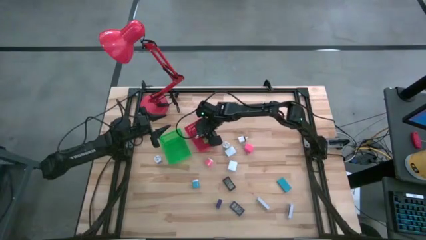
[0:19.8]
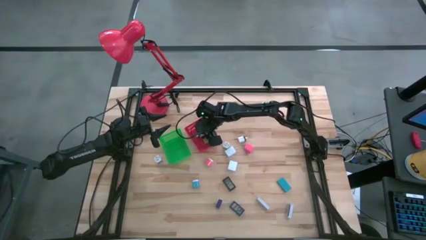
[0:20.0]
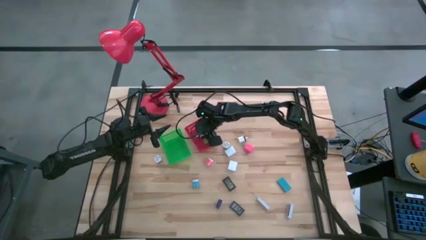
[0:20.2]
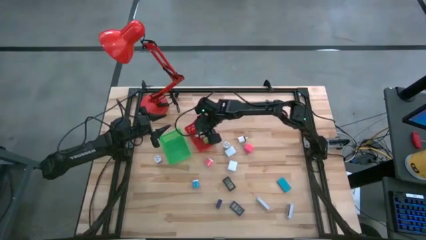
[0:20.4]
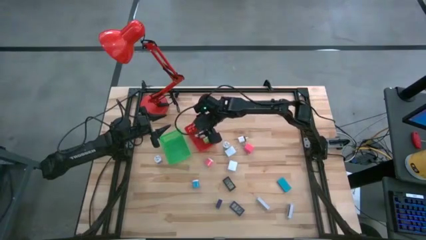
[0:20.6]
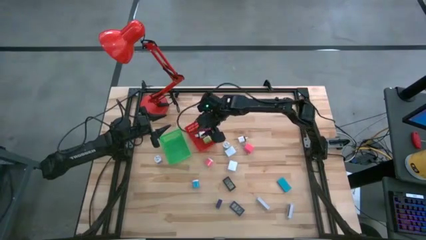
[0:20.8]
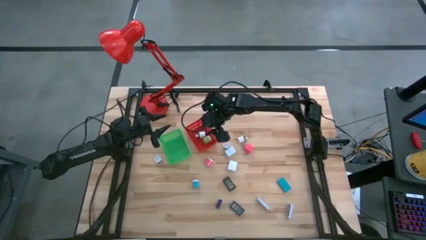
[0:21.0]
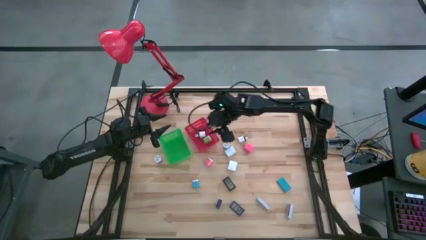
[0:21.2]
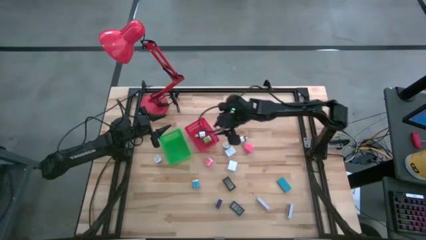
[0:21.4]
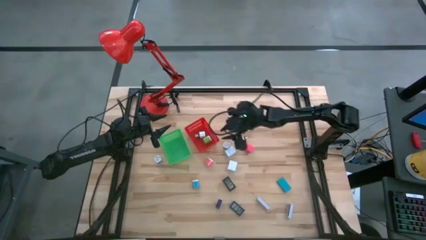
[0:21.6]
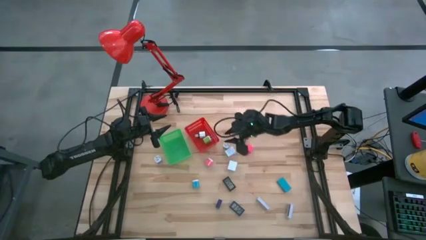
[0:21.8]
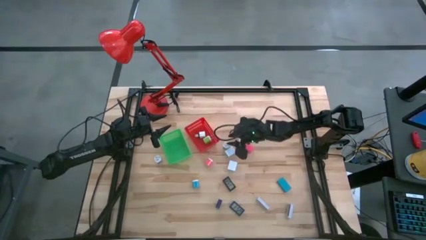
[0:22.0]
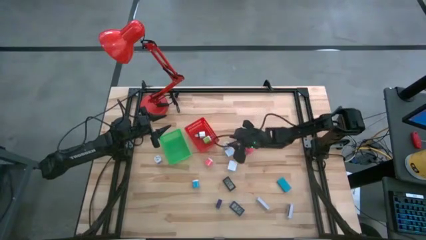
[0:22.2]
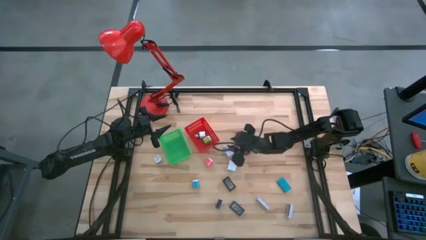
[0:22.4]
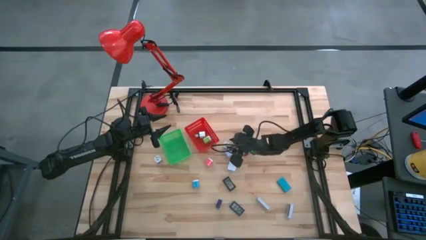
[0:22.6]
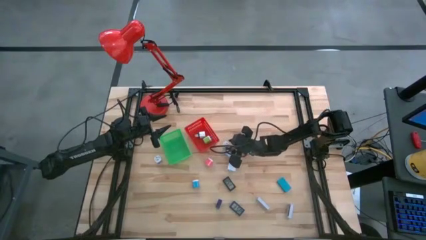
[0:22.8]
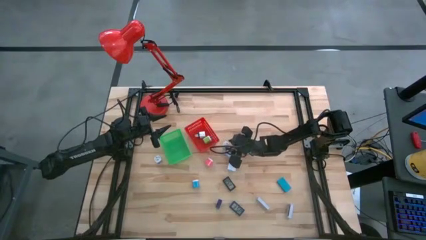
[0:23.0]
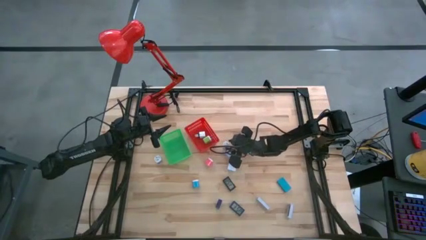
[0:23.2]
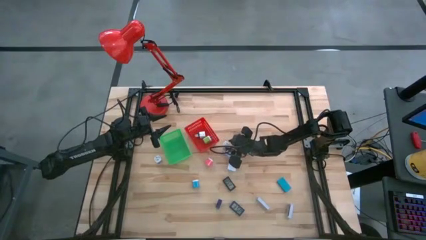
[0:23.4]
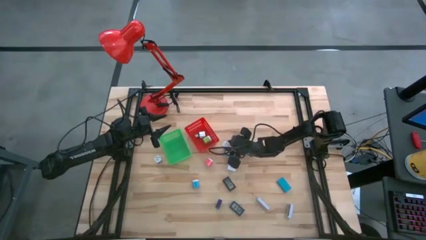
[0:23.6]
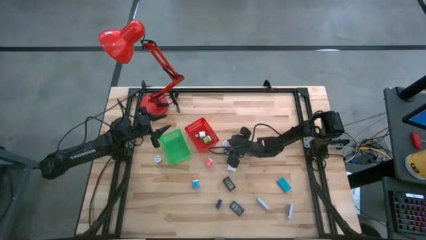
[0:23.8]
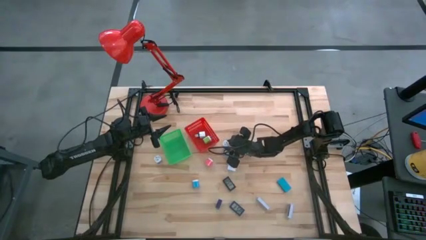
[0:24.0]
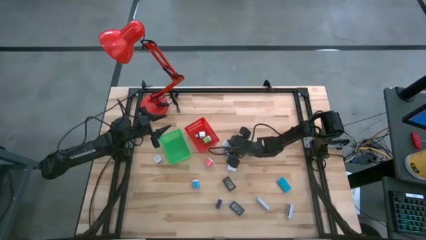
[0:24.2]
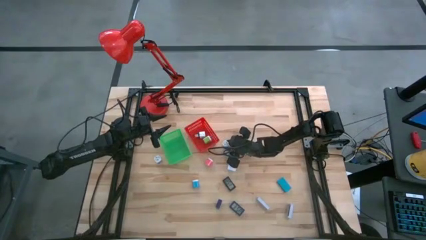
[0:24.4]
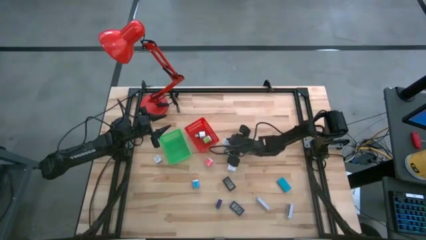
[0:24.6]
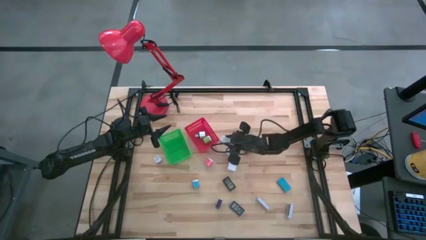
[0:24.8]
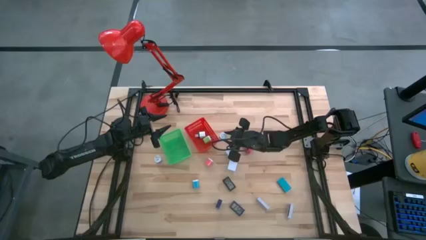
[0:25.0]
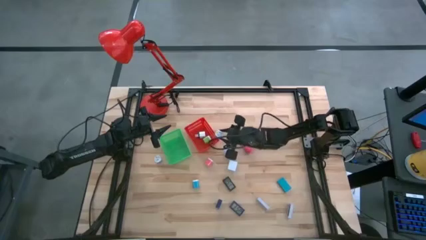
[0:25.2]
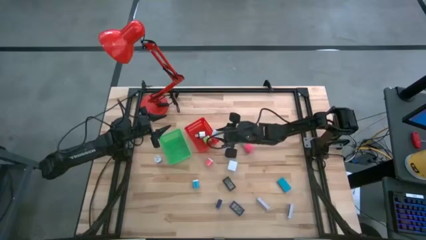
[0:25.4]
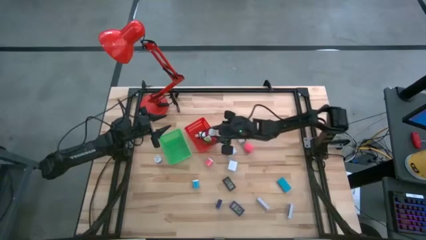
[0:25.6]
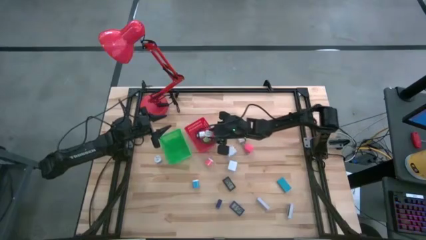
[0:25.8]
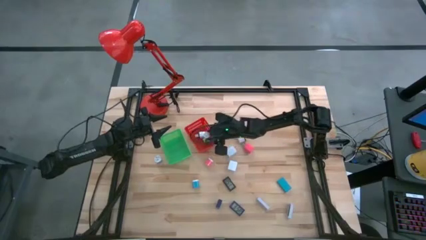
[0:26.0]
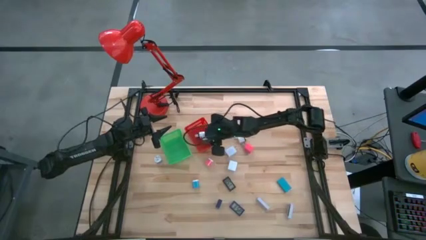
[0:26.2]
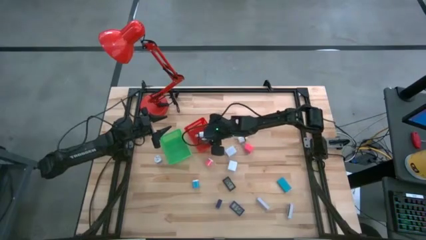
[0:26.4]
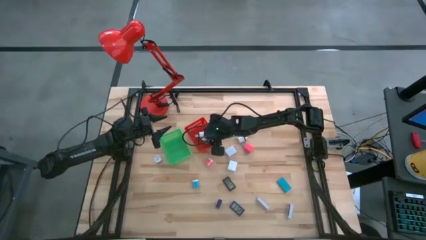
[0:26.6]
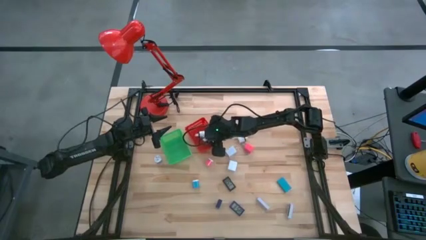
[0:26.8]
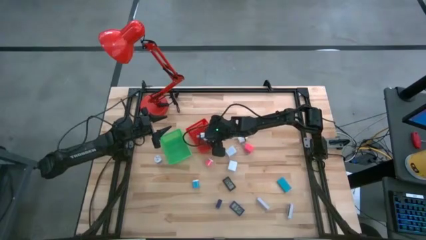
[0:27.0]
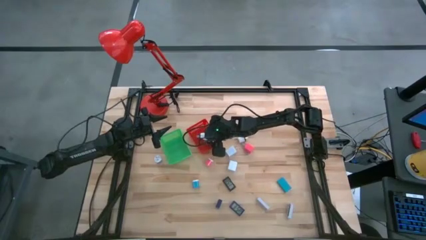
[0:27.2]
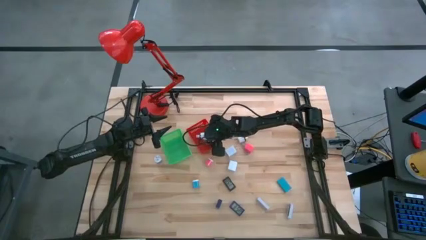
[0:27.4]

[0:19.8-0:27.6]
Task: Pick & Place Office items
Put the green charger adapter into the red bin

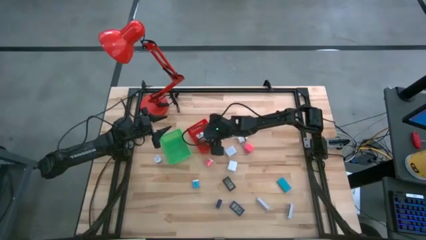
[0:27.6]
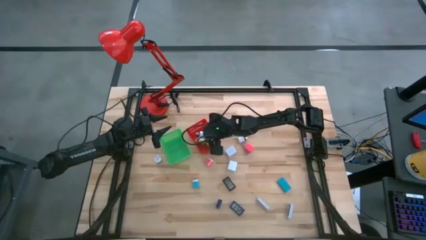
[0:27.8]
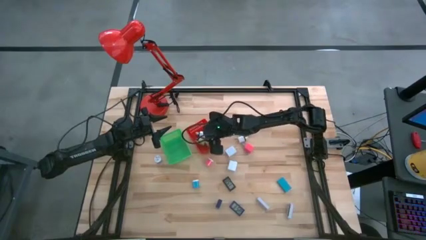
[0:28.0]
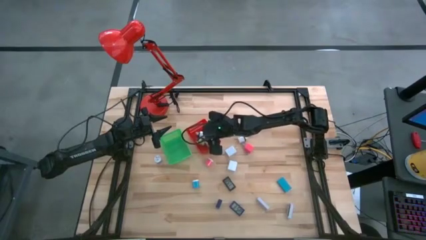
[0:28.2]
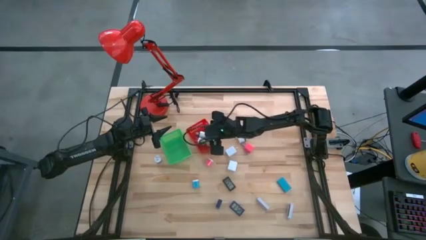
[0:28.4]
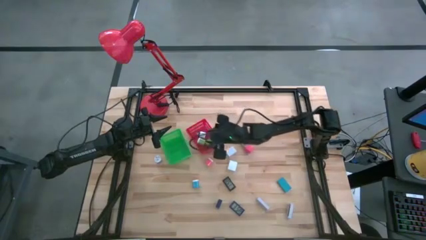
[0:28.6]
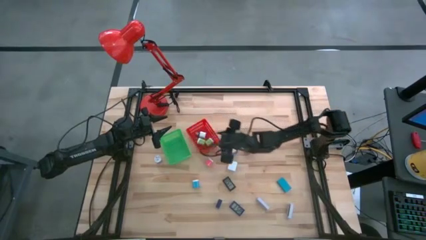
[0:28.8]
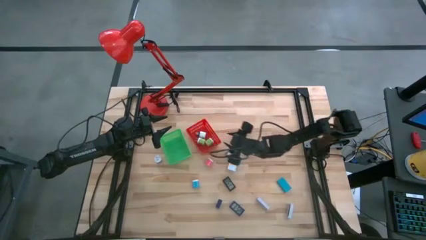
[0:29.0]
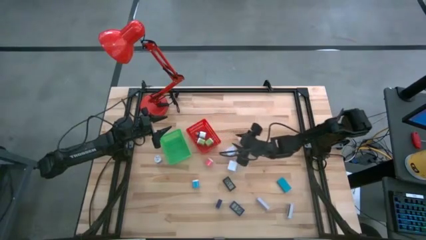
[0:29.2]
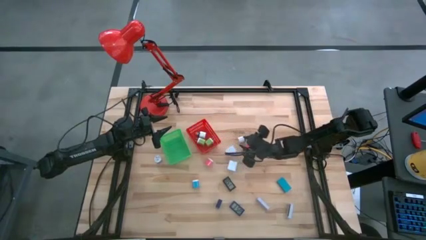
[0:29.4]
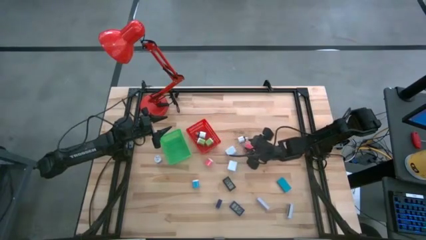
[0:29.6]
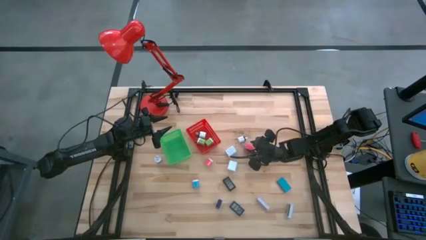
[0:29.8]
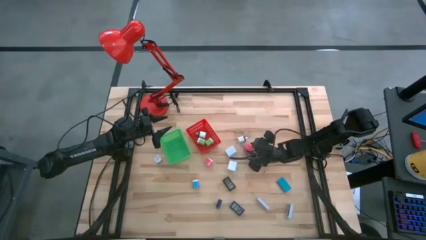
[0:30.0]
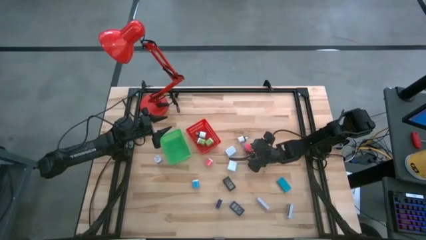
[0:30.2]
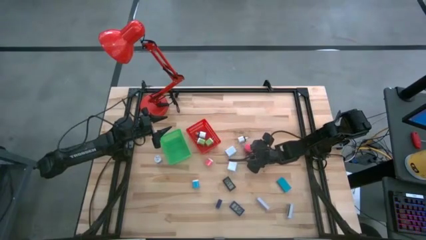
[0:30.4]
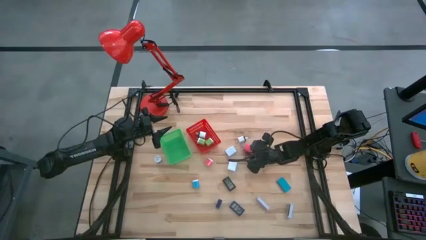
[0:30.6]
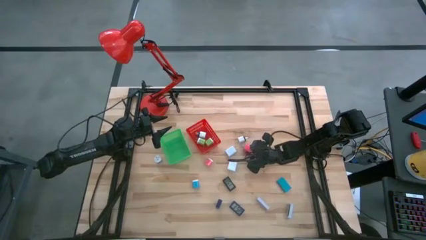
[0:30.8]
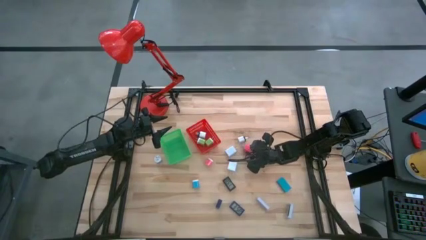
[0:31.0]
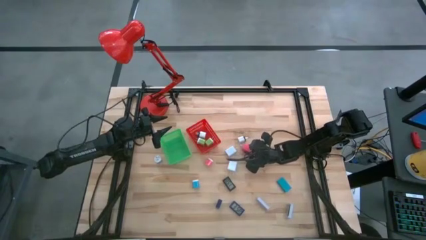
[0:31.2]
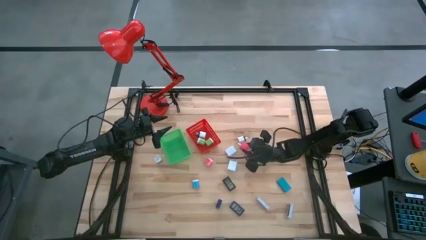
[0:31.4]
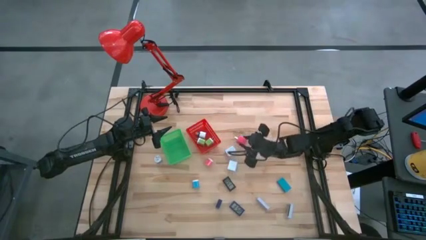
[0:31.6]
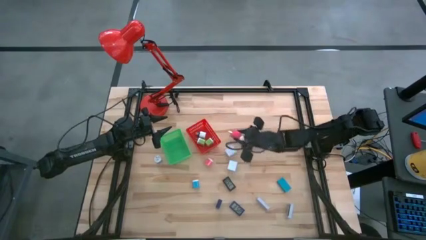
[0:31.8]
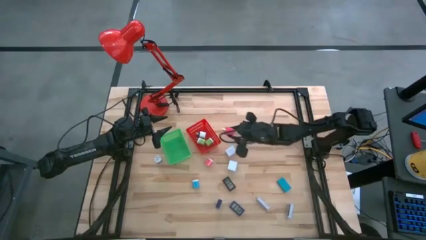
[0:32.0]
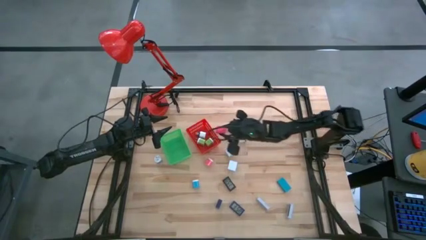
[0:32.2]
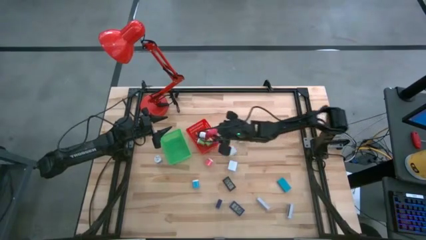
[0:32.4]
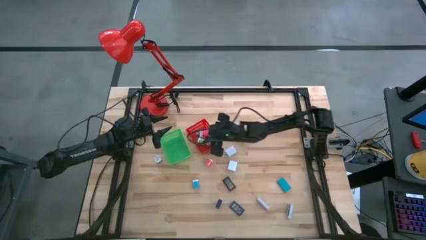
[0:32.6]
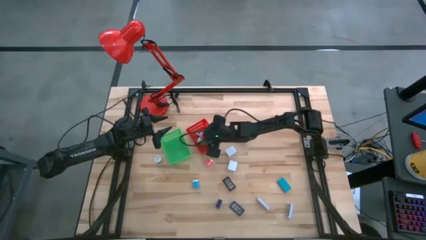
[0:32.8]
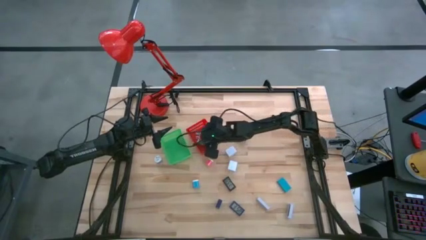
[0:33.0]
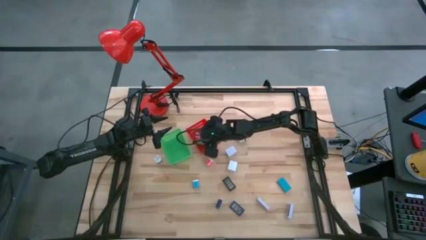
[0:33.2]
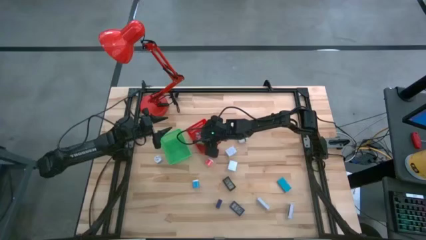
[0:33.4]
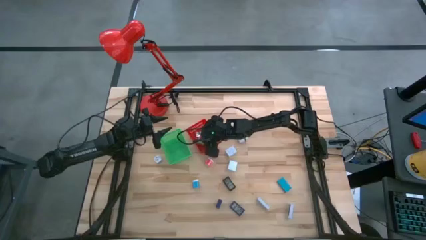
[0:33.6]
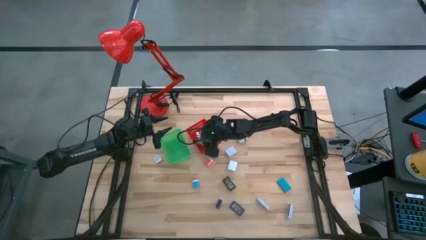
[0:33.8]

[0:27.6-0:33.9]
Put the right pink charger adapter into the red bin
